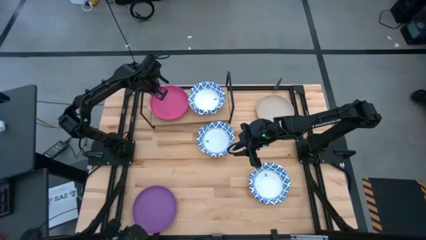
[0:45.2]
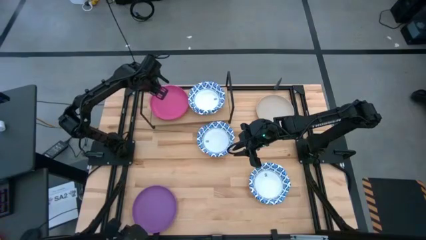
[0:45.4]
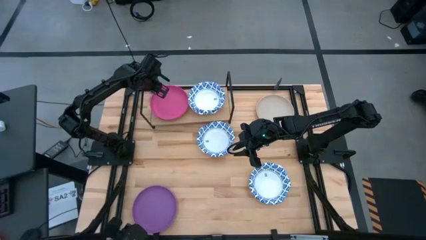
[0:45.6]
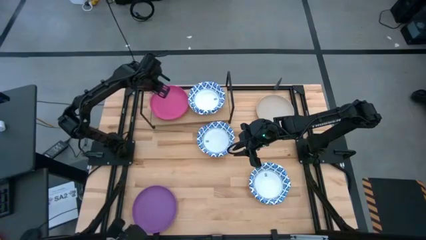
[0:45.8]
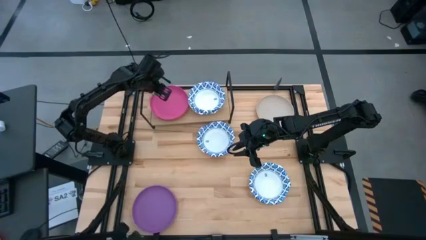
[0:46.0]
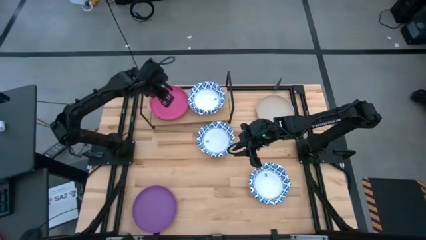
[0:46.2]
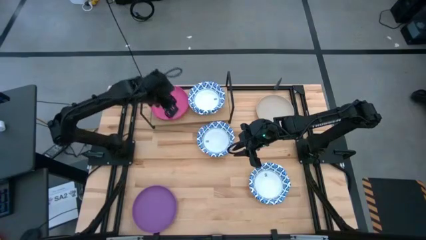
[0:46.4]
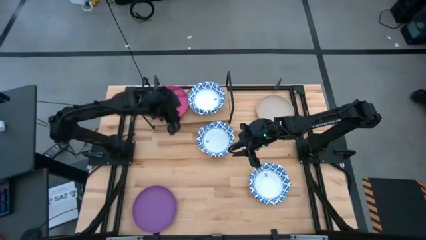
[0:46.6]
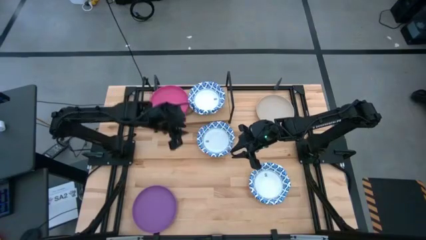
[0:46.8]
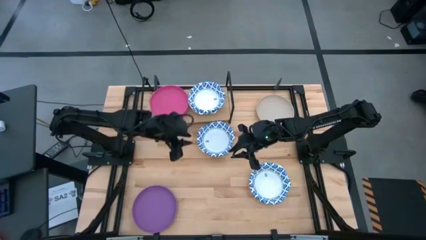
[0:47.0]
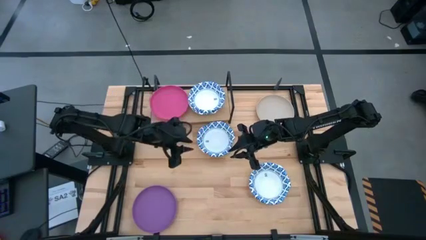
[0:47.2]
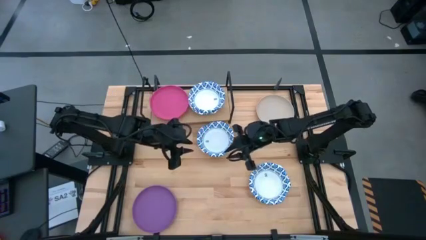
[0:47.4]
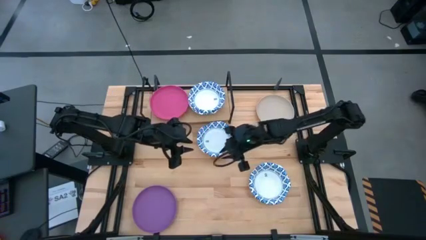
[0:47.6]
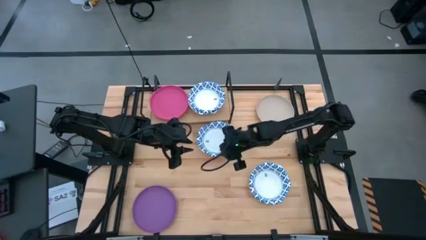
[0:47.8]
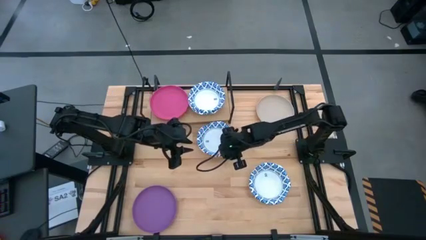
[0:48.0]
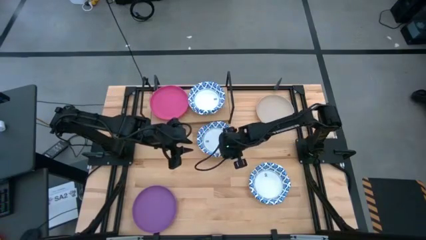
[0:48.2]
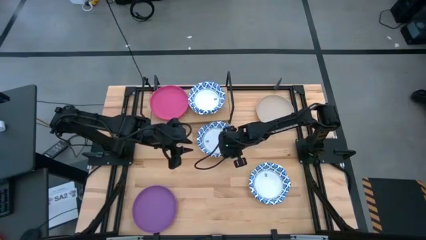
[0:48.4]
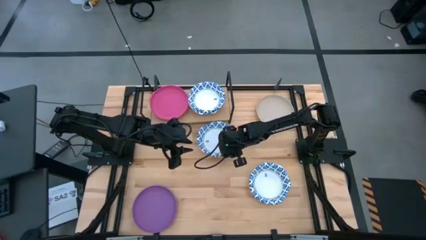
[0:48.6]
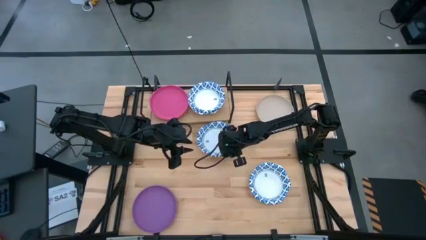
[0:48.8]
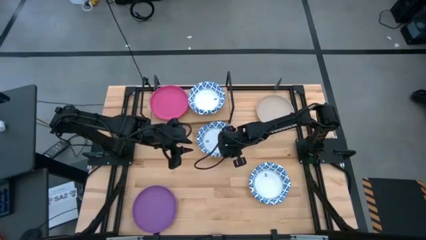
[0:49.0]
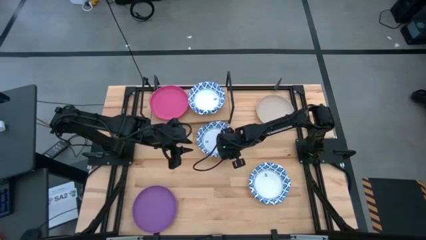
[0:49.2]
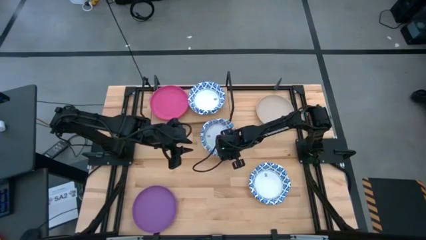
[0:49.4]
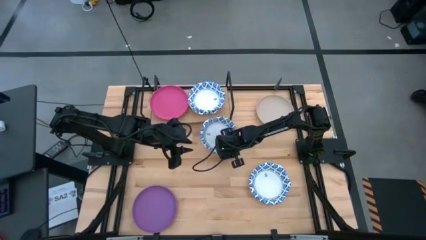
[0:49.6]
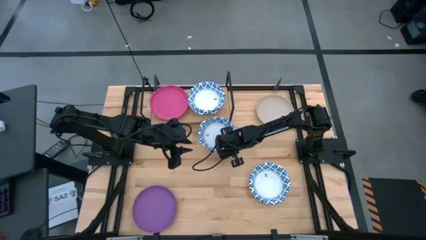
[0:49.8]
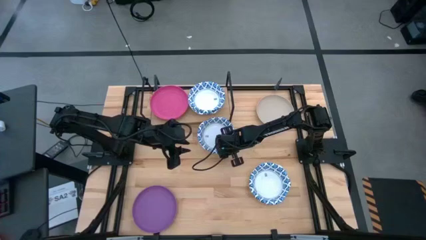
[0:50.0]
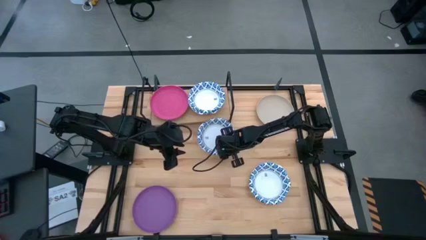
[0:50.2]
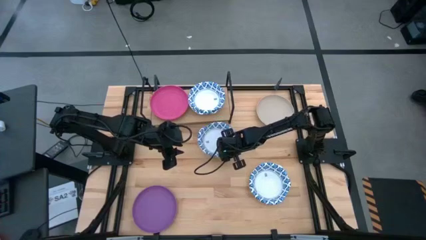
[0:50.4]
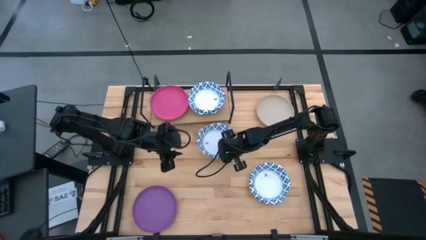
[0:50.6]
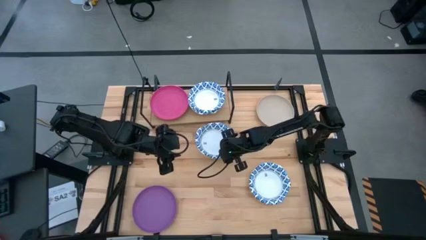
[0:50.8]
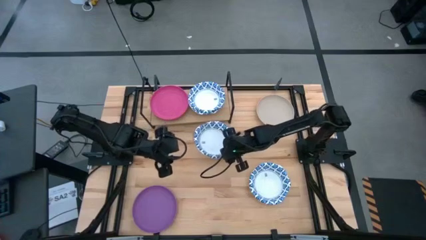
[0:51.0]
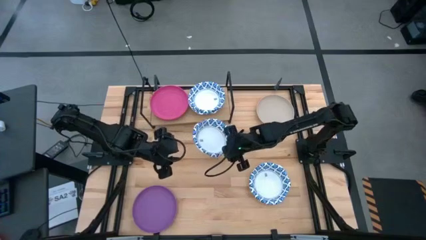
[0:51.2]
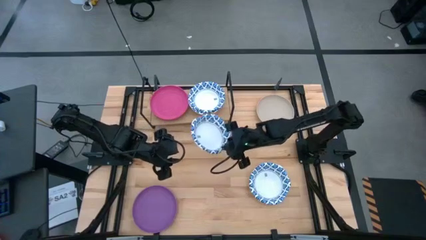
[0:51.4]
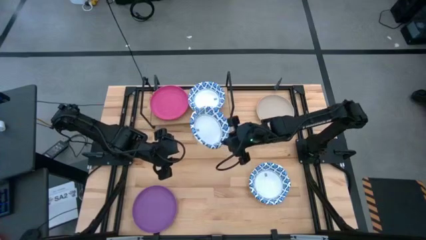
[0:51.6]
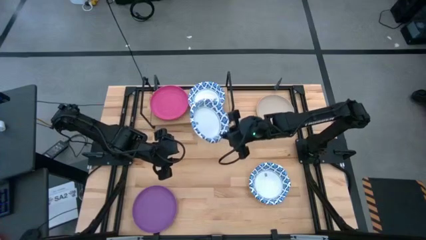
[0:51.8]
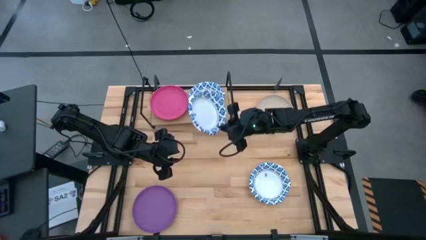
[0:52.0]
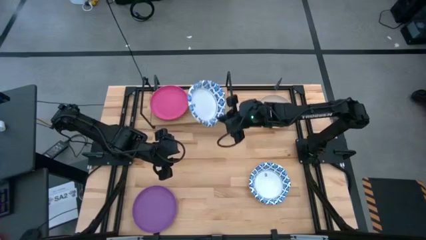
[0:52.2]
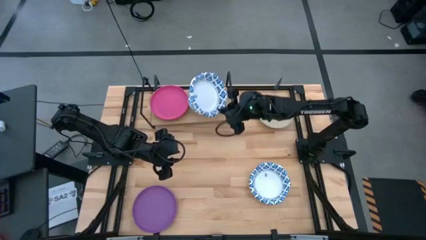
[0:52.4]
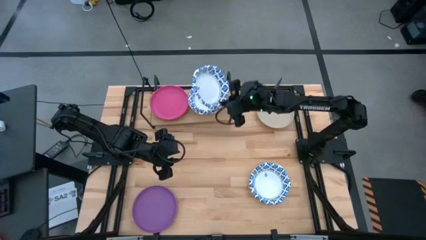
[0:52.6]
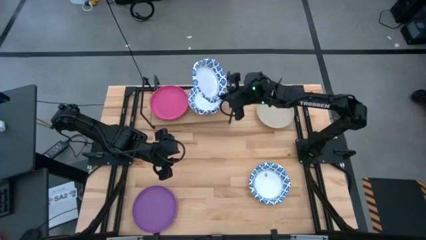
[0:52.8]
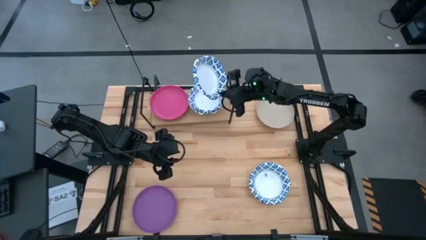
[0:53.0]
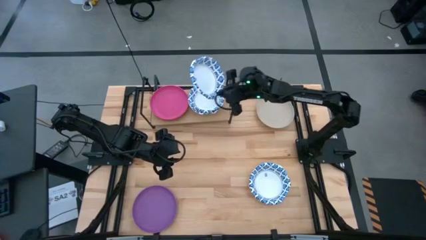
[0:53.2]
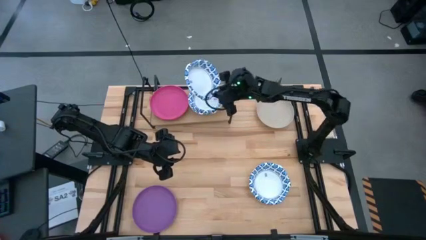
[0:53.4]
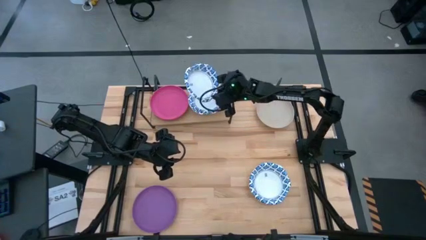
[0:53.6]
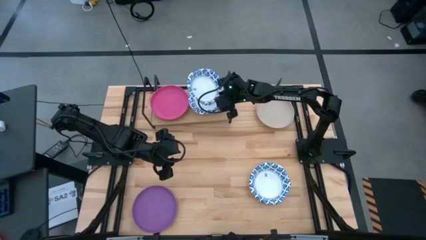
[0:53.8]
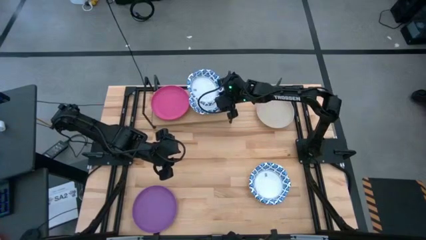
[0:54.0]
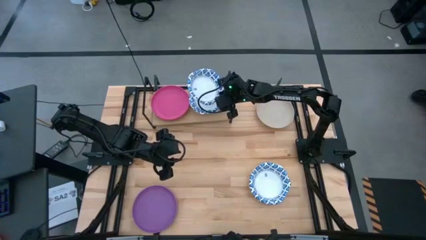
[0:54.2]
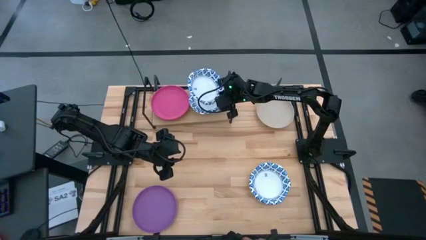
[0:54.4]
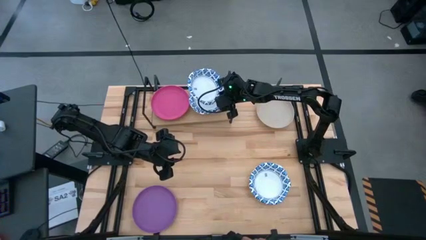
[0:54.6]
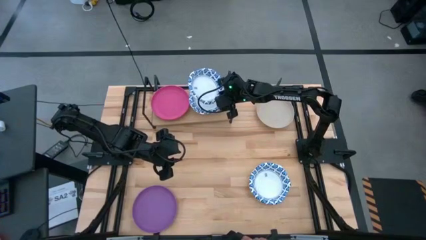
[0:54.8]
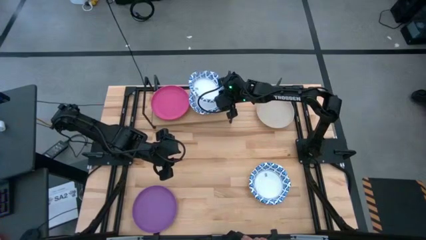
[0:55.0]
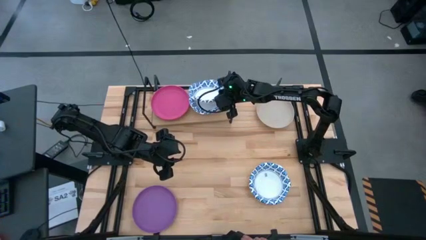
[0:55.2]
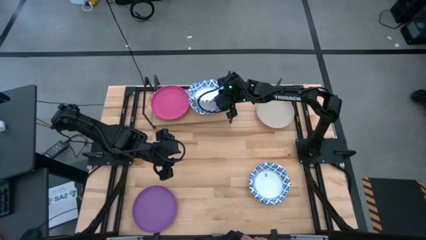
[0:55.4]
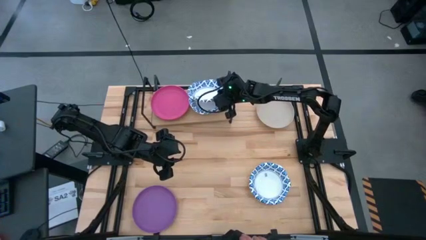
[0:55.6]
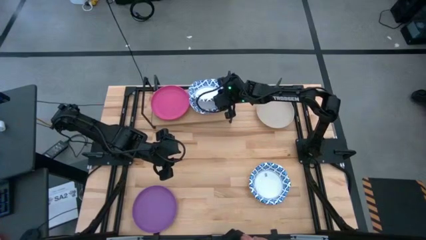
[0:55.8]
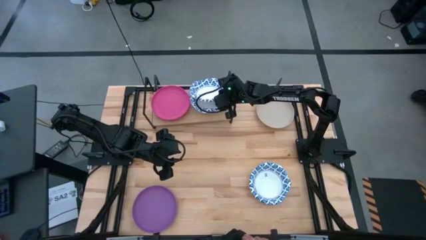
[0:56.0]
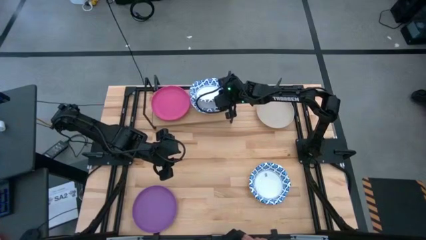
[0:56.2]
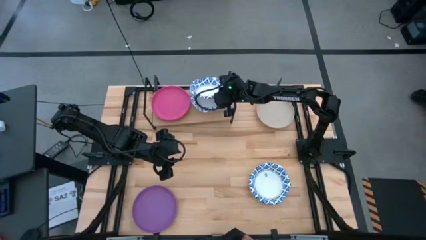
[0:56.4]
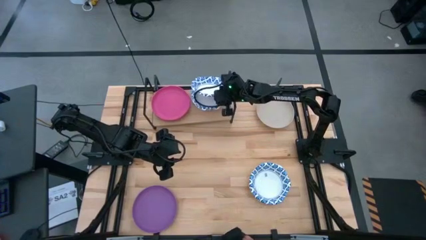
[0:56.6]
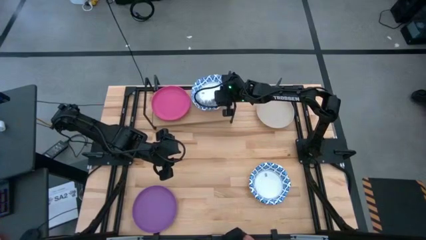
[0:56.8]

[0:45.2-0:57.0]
Task: Place and stack plates onto a shelf
Stack the white bowl on top of the white bowl on the shelf
